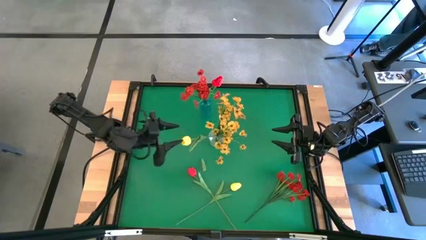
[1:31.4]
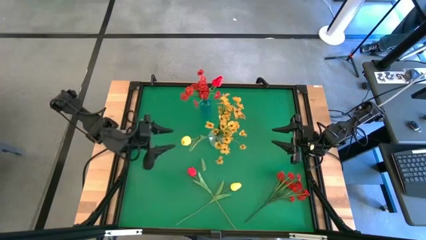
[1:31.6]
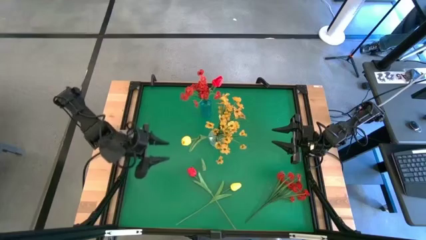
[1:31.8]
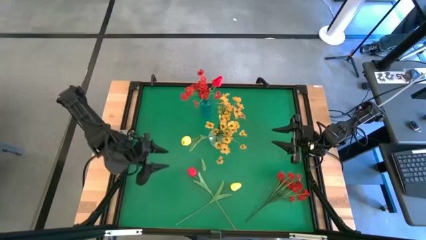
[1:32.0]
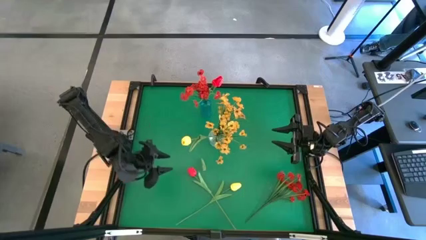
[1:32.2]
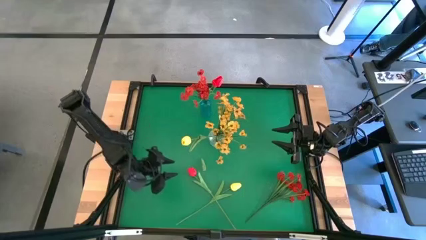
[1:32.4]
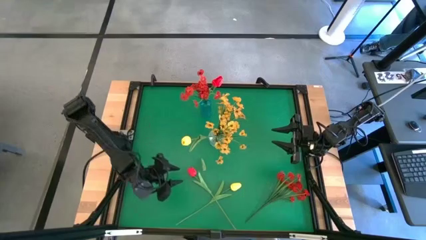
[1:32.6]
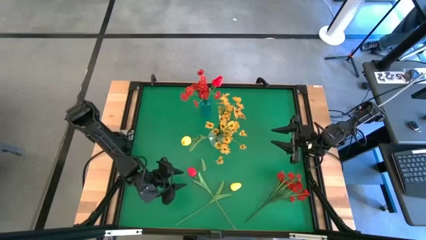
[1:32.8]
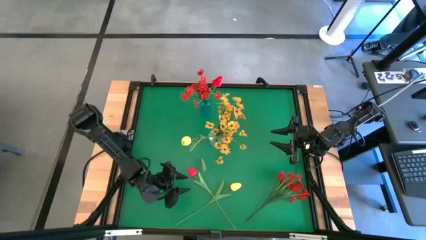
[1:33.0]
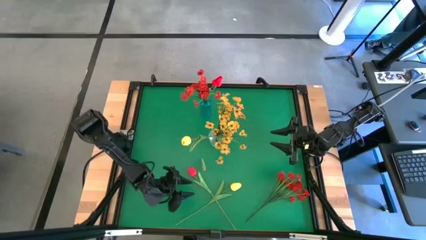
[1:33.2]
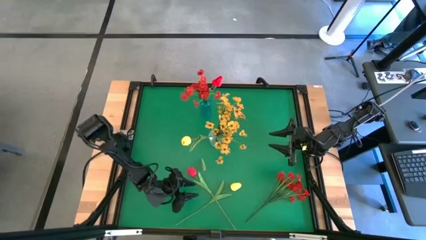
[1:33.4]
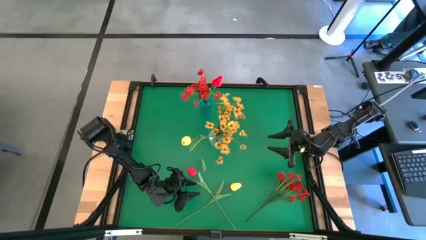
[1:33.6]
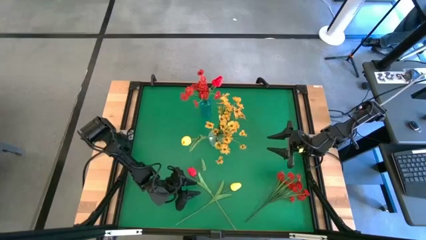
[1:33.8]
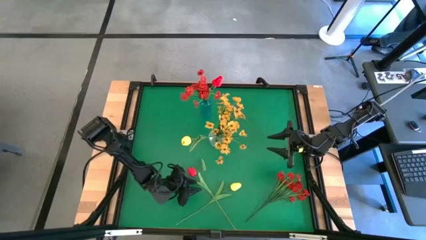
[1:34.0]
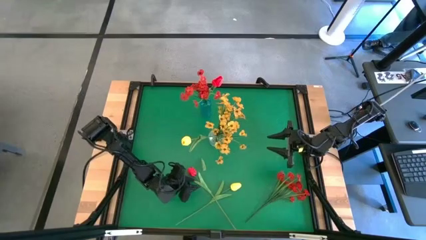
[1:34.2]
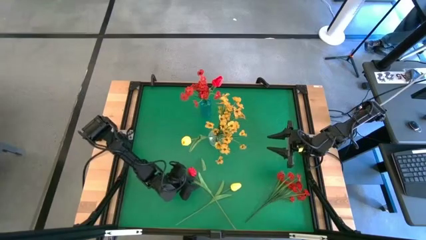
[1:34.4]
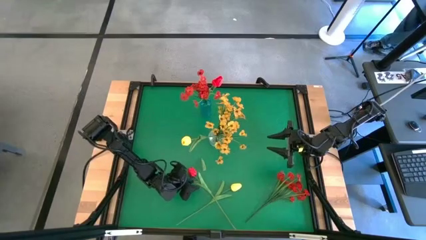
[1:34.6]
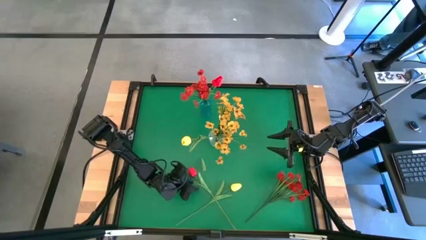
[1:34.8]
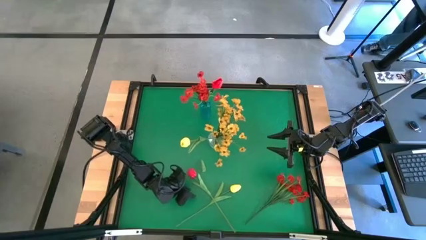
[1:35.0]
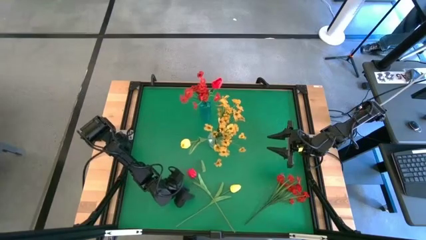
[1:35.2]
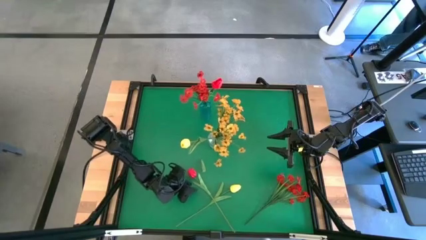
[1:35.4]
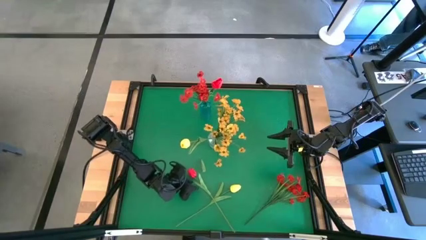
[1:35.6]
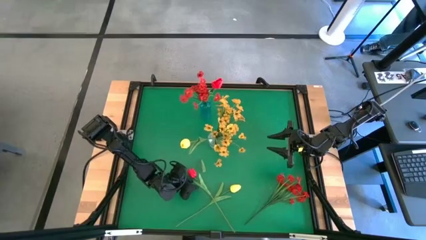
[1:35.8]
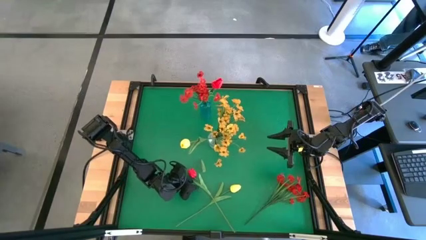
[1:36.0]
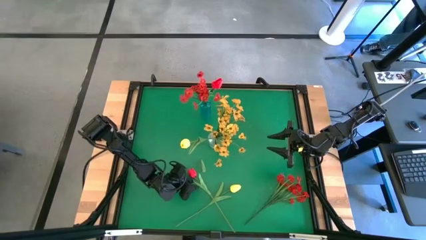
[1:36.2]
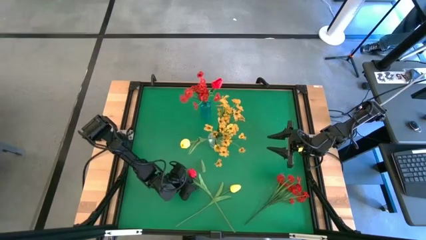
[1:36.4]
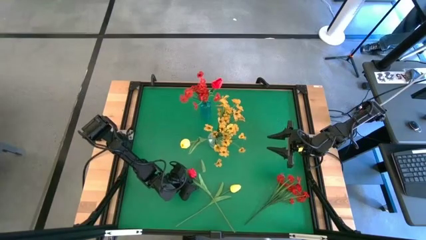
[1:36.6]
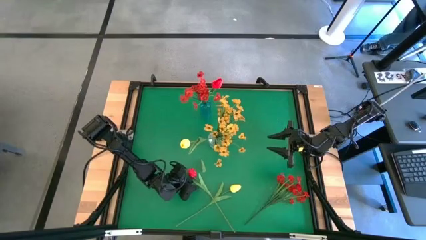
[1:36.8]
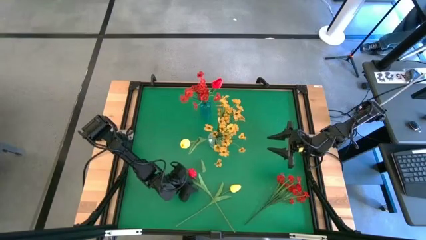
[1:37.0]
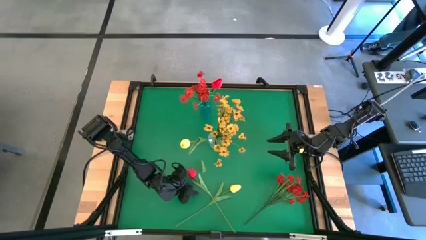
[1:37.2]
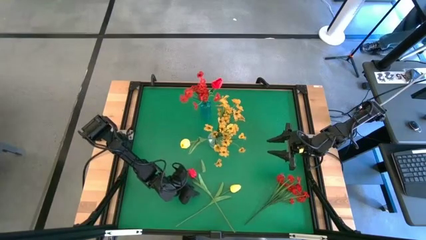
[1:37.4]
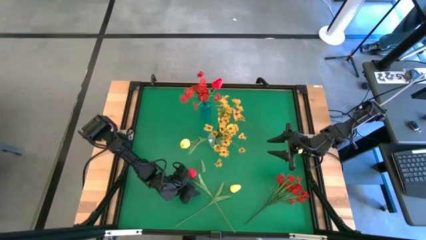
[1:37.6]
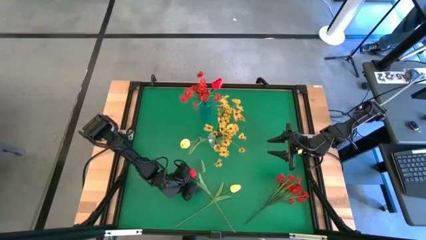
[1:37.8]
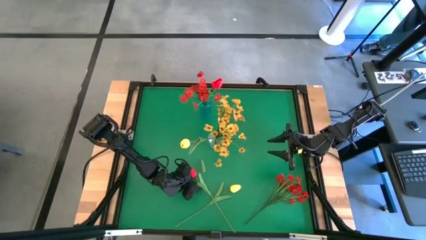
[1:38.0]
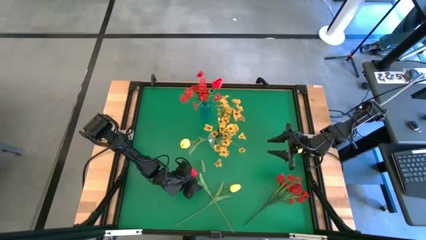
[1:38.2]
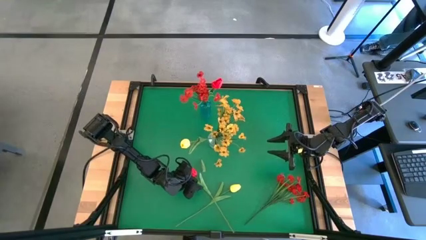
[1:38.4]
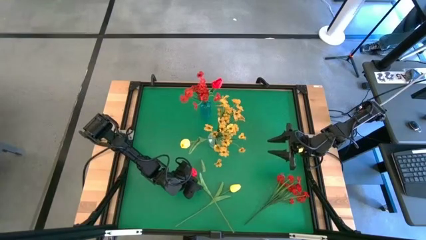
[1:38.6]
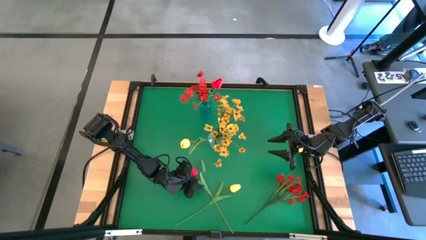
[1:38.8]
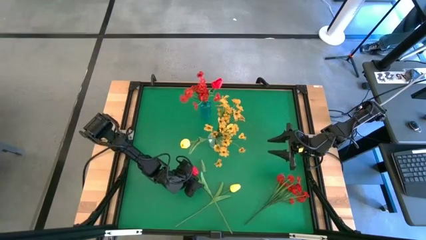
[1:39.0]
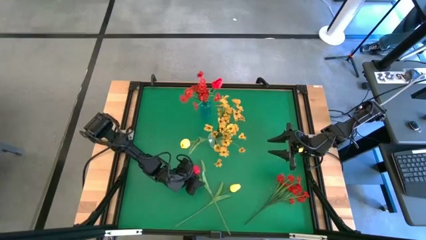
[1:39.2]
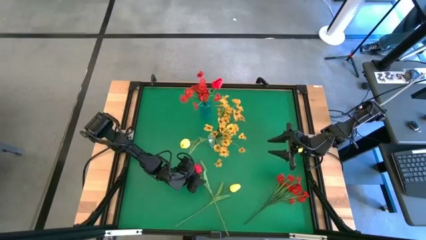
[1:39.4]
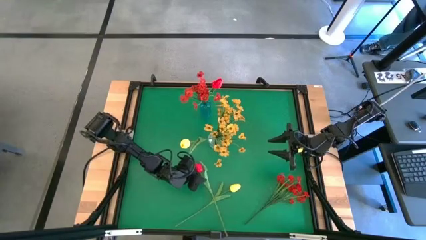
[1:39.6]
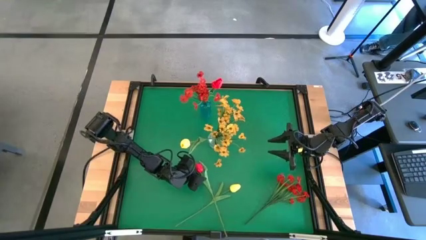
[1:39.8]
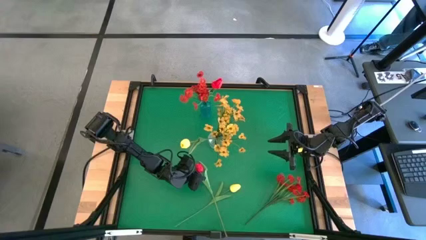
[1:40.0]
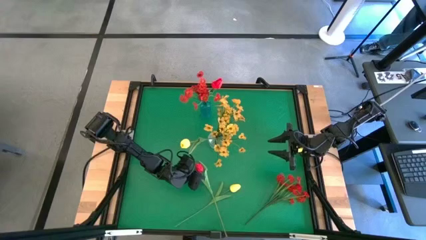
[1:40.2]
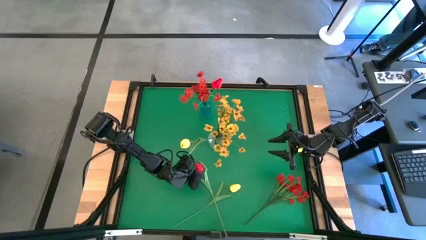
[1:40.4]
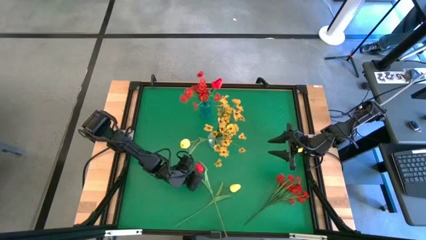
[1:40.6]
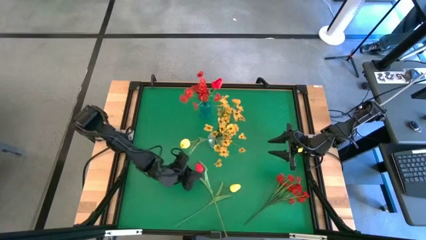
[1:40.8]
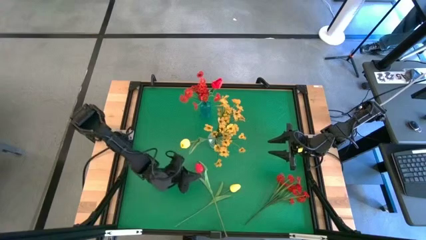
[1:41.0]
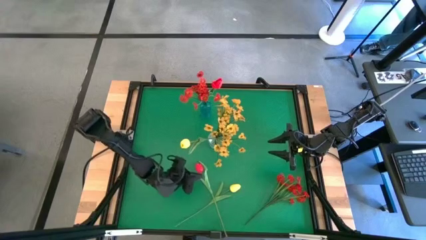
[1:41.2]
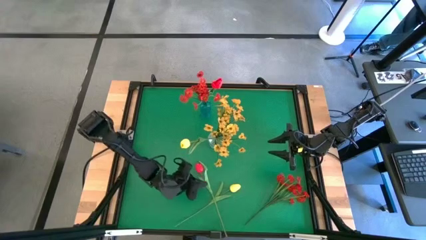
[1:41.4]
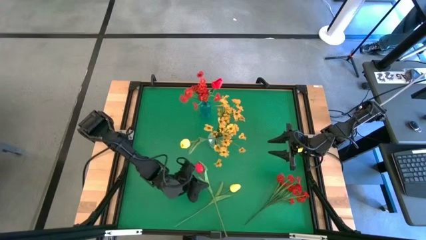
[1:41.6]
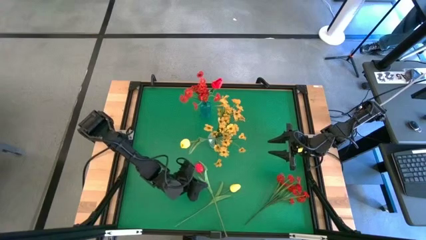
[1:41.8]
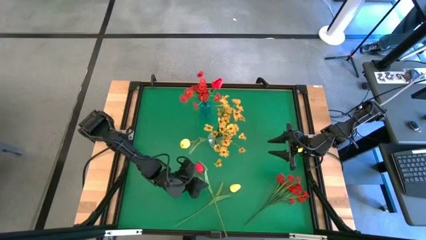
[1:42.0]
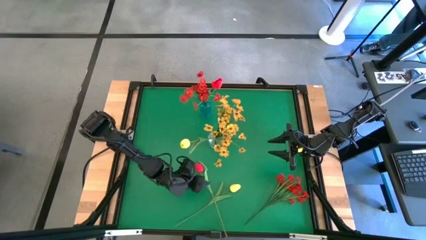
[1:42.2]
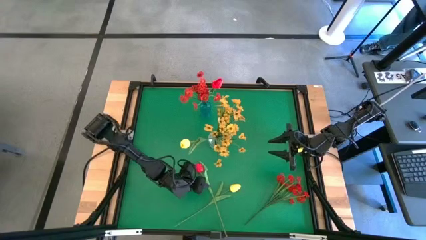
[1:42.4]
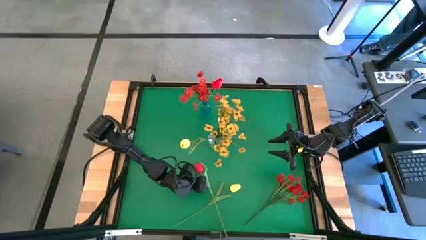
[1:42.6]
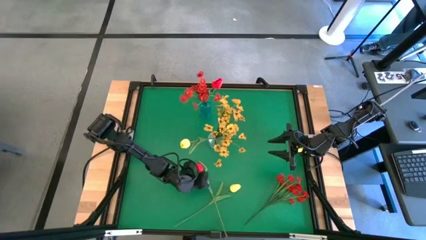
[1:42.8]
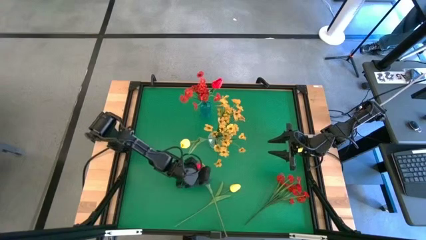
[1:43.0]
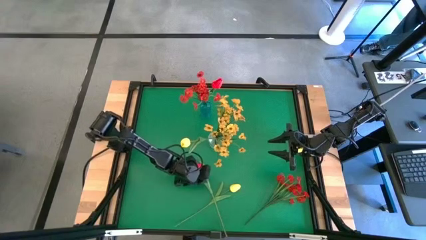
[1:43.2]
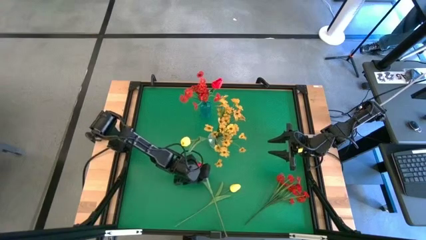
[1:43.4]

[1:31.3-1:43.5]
Task: Sort flowers into vase by color
Put the red flower into the blue vase
